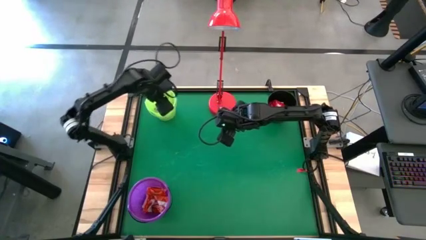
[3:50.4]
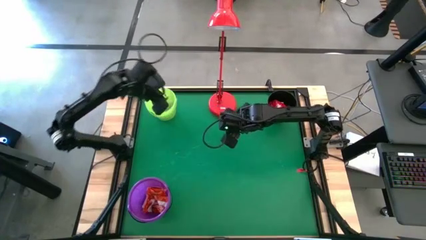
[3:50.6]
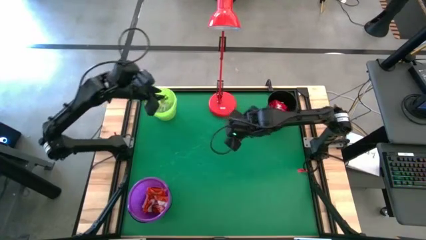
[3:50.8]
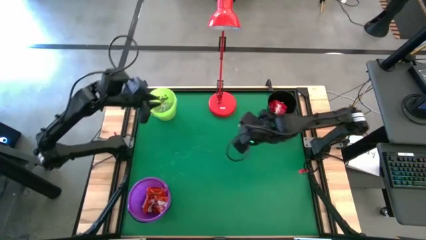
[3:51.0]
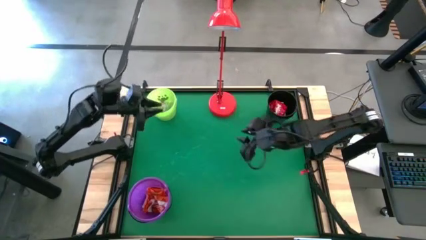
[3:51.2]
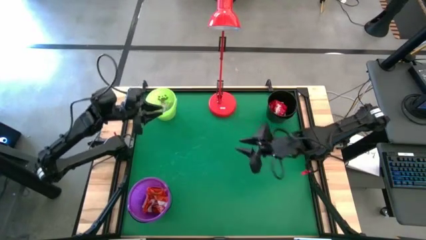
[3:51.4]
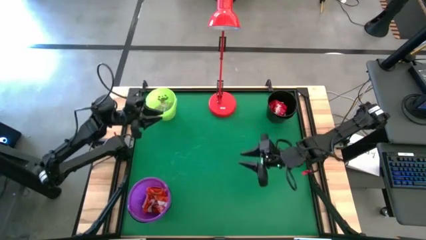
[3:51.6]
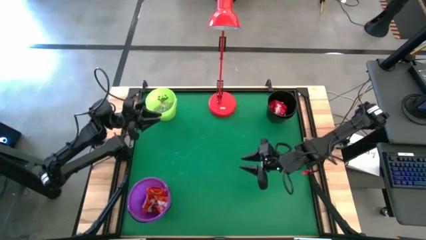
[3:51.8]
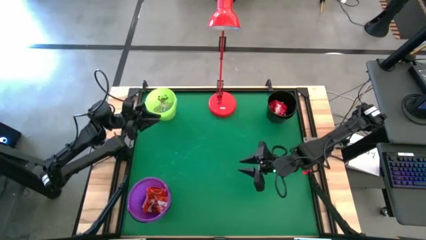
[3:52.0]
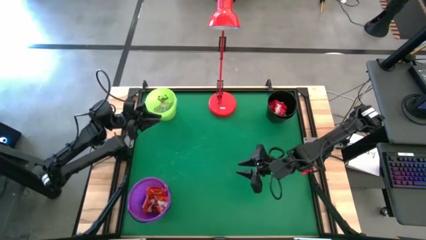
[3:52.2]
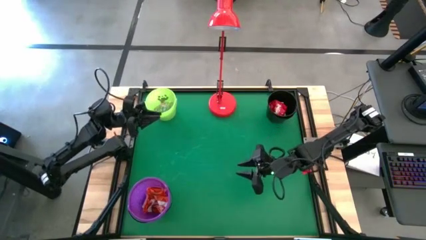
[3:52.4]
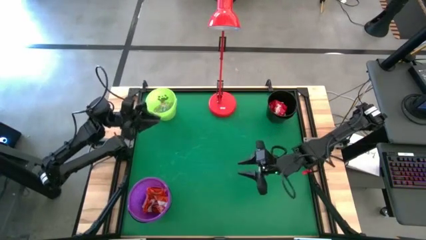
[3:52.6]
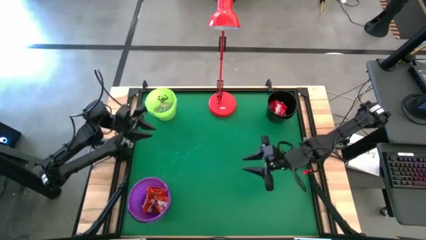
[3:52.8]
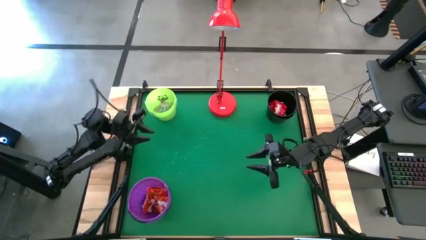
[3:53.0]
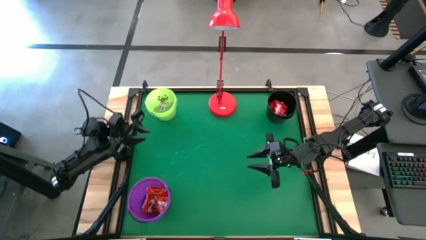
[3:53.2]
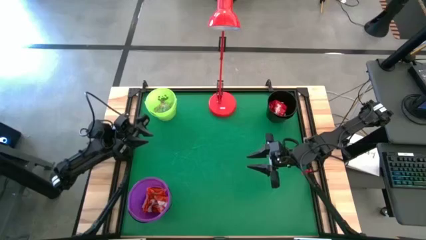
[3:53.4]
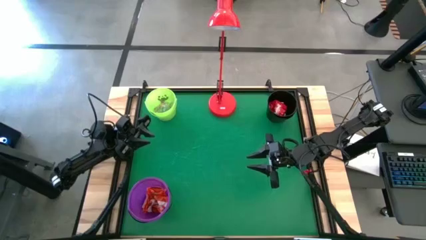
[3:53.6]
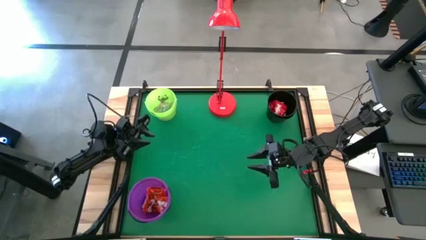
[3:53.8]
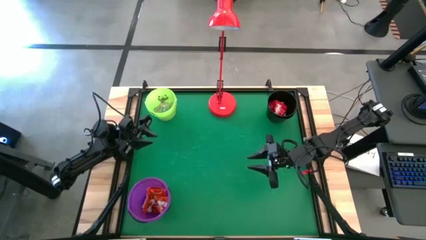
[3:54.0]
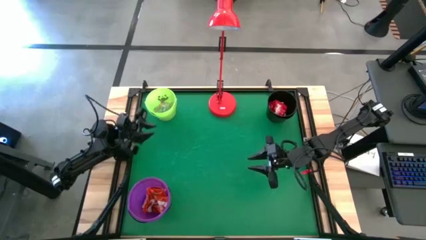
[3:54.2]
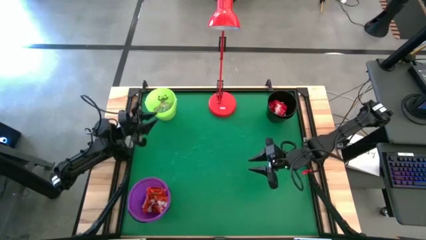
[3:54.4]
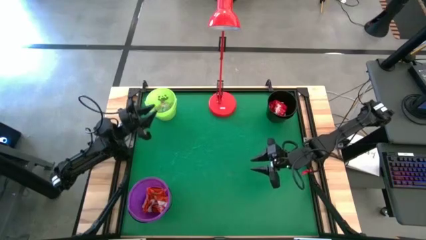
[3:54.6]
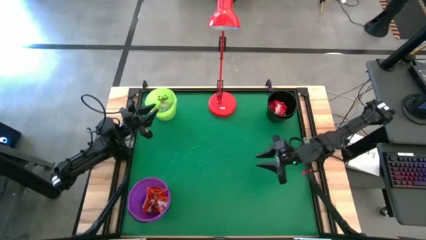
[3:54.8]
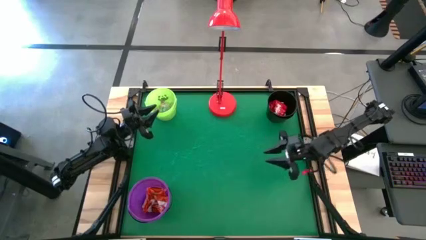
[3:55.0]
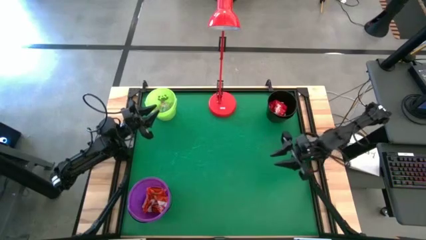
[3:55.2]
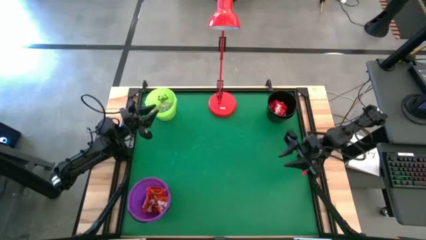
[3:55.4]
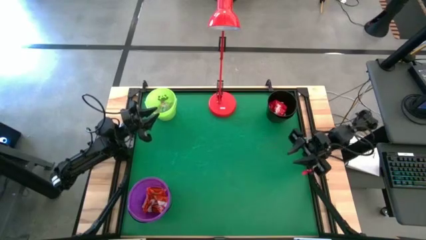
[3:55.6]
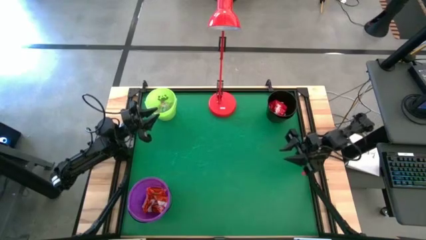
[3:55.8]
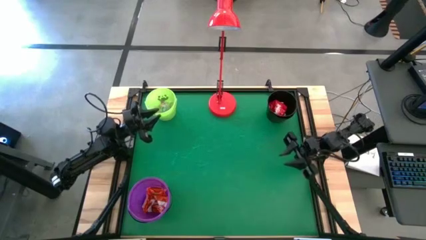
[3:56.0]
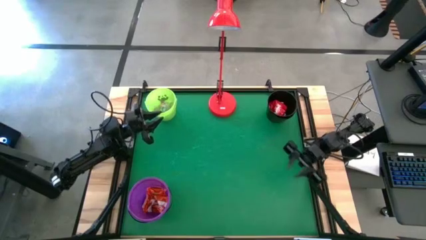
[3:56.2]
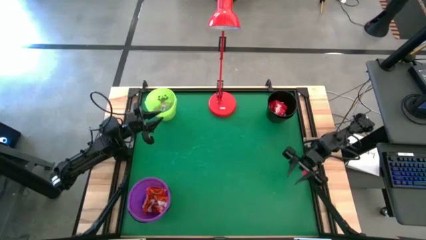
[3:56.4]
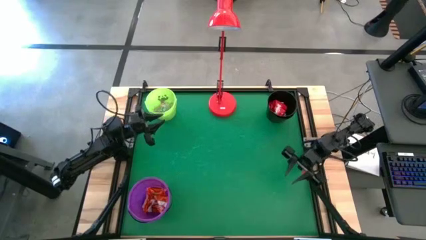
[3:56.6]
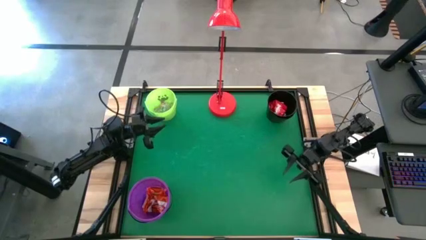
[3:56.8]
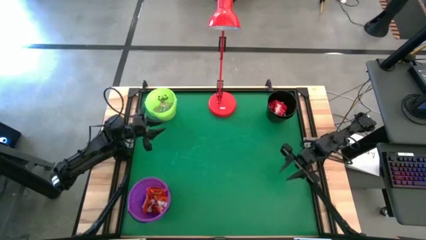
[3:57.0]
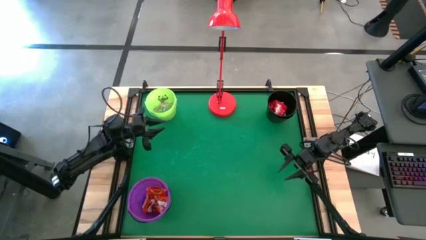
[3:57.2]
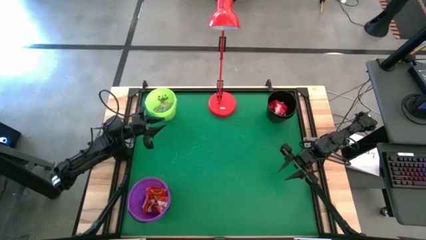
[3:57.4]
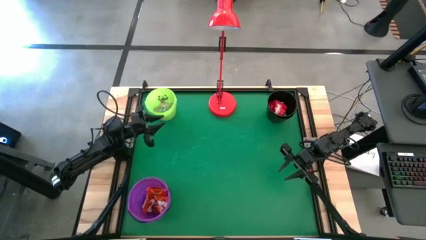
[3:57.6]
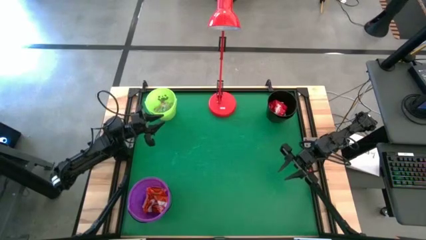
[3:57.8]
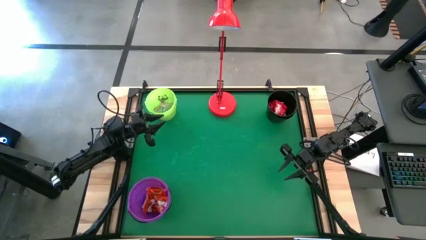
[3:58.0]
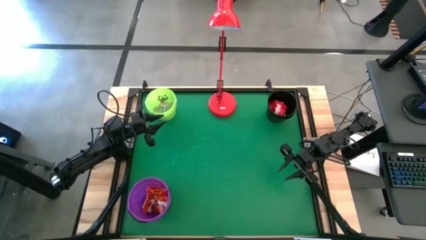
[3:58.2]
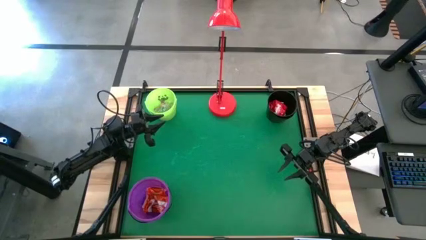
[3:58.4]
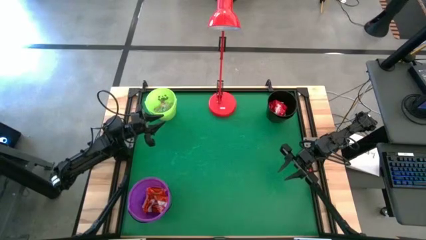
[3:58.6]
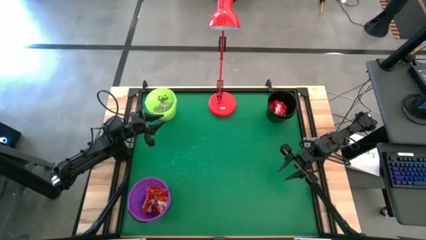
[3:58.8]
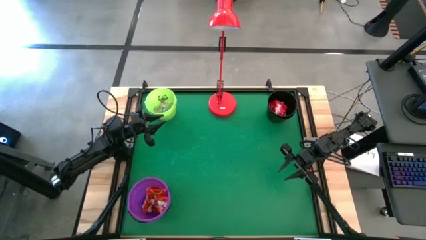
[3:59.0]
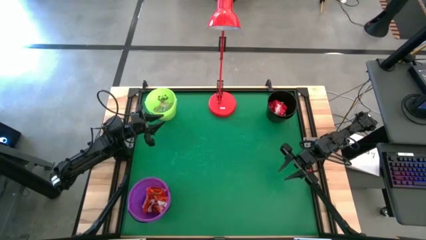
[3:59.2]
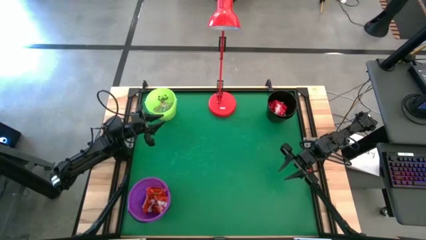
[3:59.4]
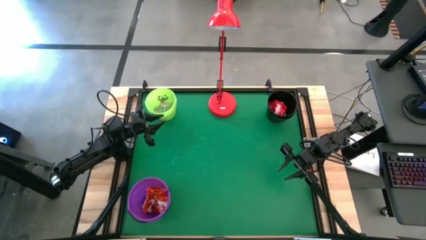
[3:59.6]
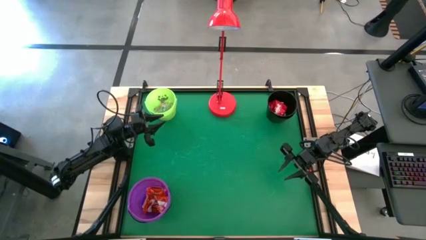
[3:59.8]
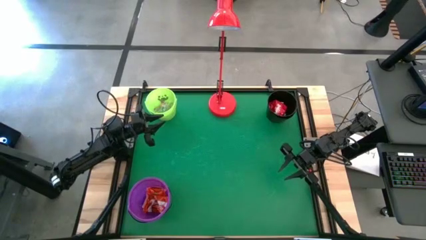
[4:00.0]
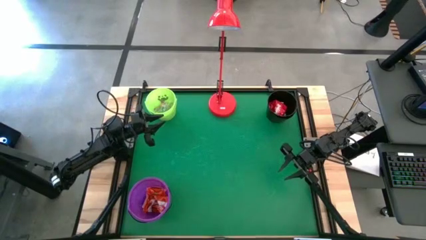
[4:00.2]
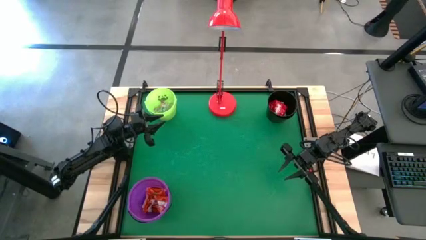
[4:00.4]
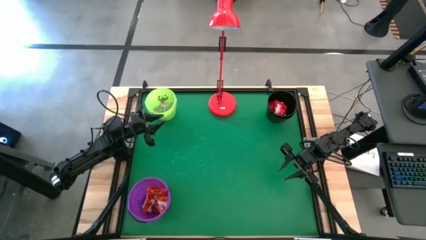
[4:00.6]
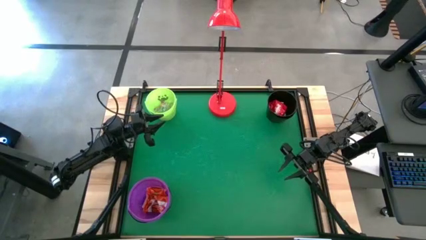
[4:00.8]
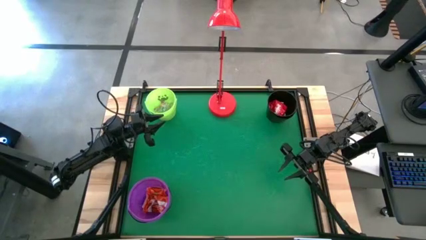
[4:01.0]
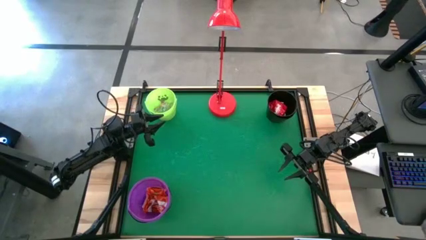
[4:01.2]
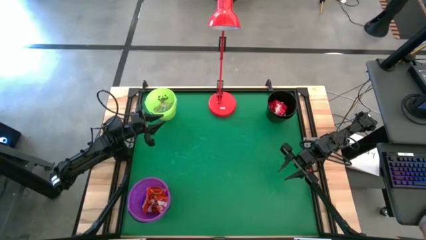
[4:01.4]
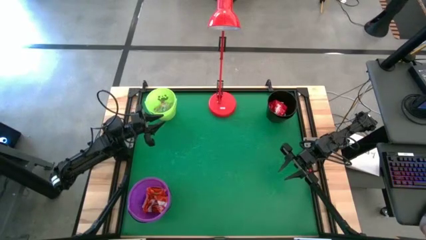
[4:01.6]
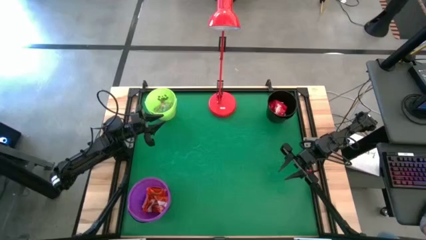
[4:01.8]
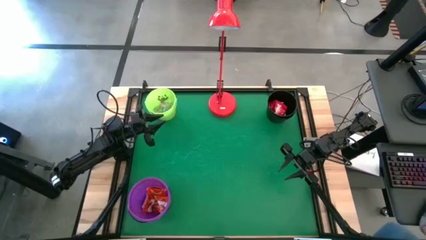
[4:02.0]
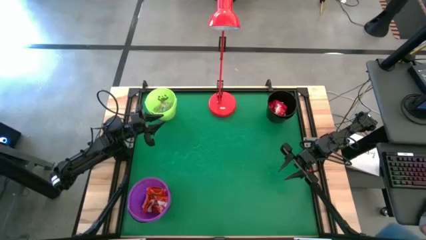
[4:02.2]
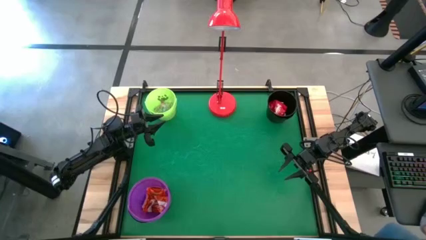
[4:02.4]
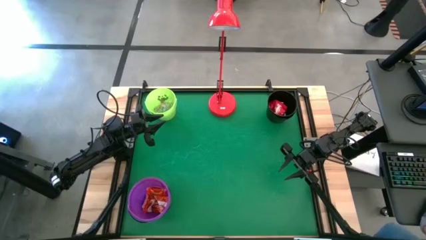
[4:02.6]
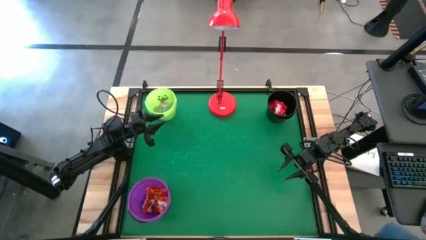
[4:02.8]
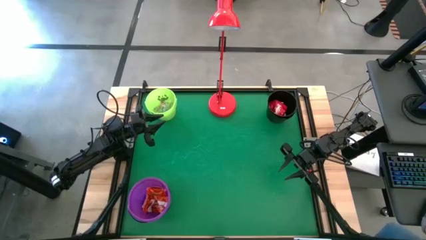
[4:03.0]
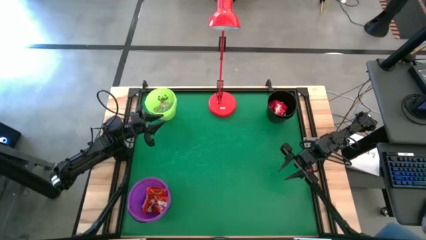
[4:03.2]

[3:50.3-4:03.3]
Task: Sort candy
Return to Home Position
